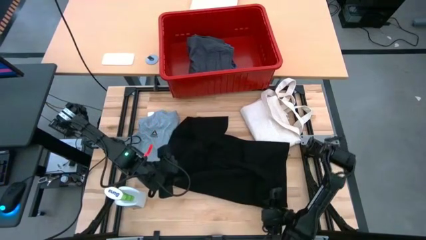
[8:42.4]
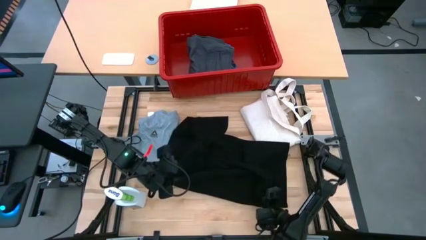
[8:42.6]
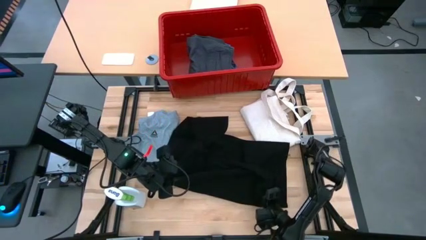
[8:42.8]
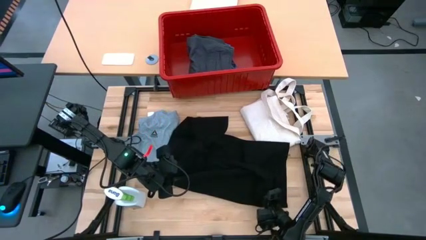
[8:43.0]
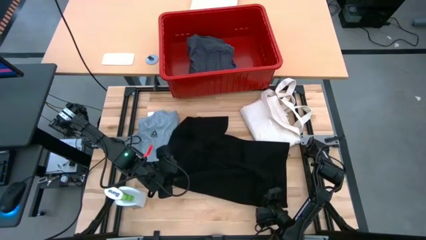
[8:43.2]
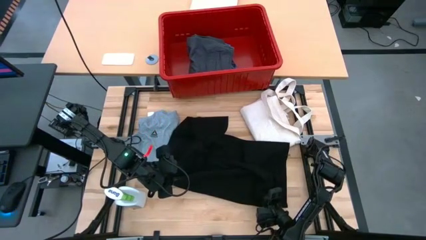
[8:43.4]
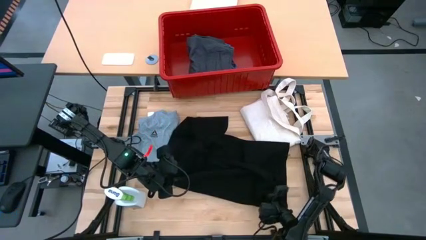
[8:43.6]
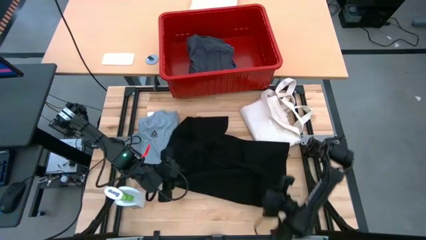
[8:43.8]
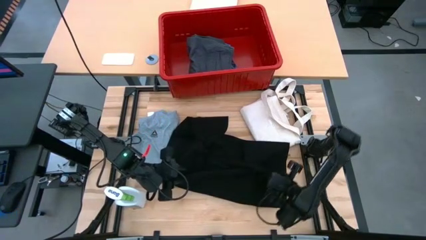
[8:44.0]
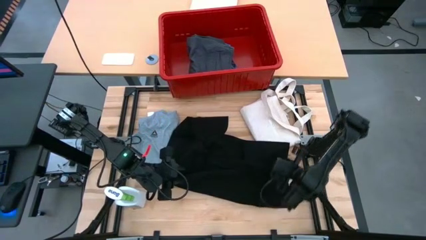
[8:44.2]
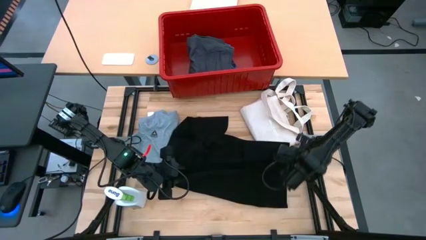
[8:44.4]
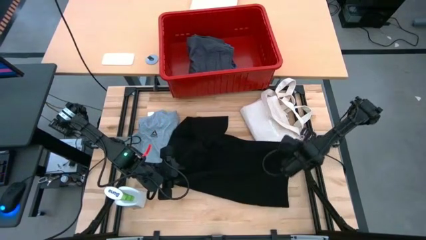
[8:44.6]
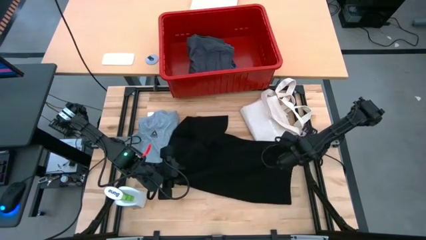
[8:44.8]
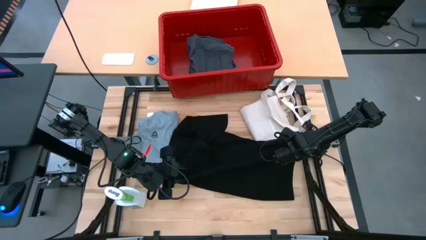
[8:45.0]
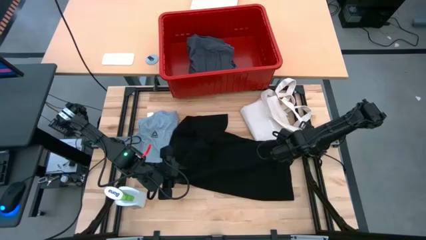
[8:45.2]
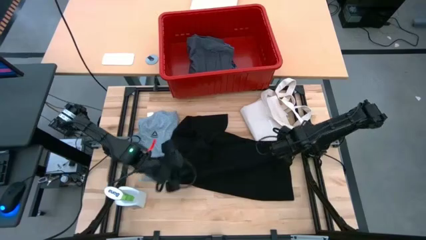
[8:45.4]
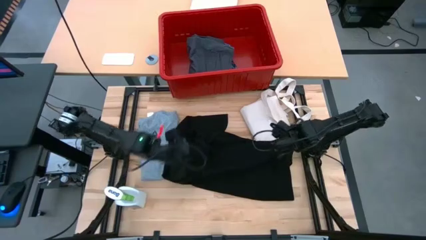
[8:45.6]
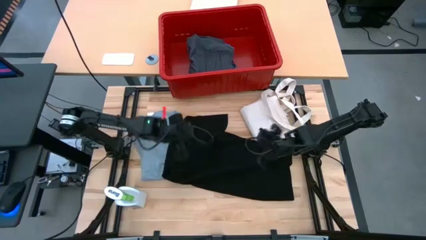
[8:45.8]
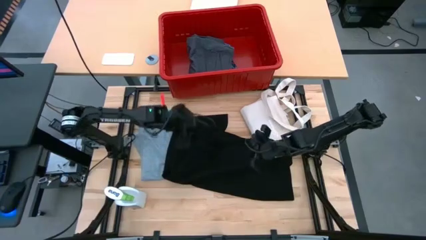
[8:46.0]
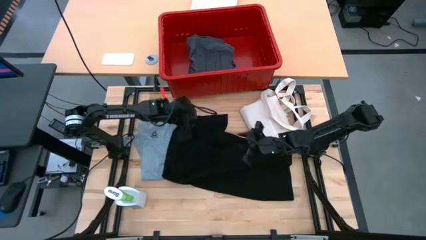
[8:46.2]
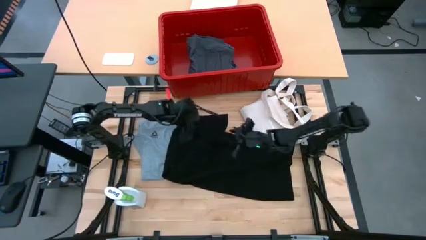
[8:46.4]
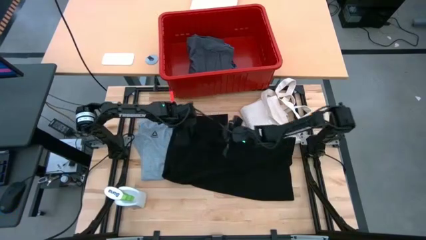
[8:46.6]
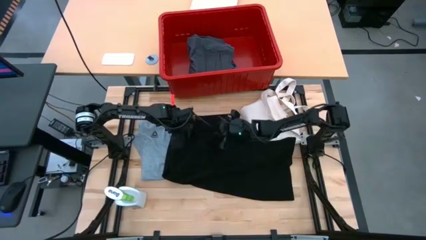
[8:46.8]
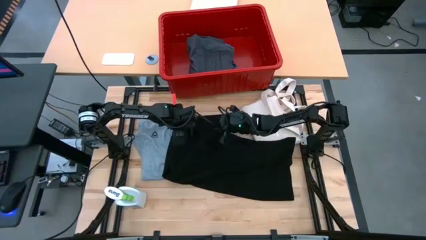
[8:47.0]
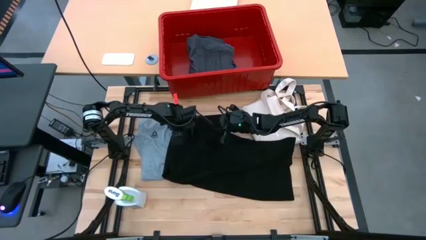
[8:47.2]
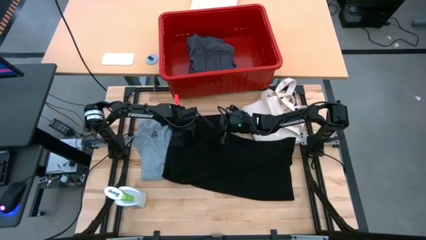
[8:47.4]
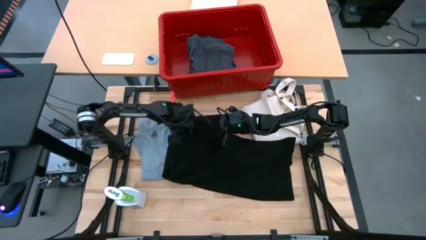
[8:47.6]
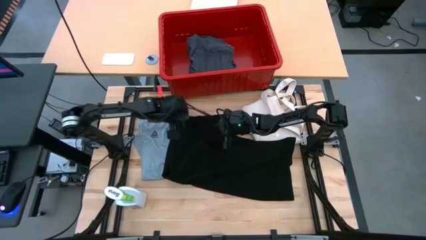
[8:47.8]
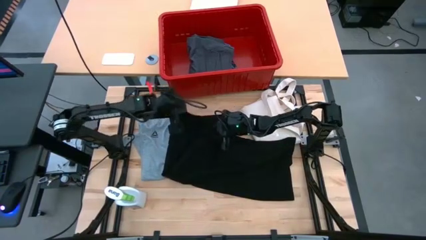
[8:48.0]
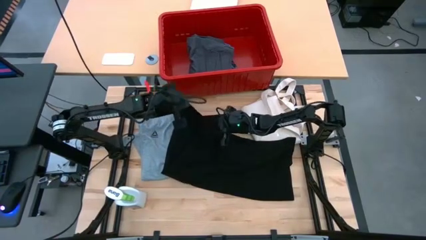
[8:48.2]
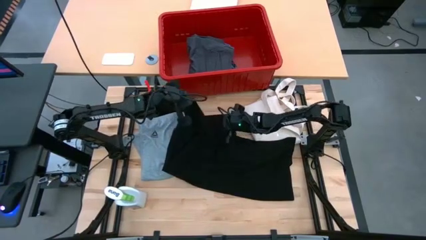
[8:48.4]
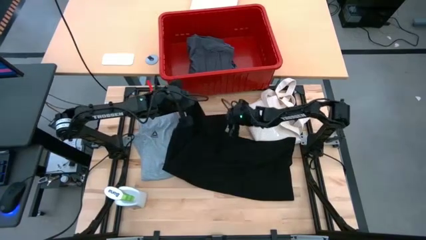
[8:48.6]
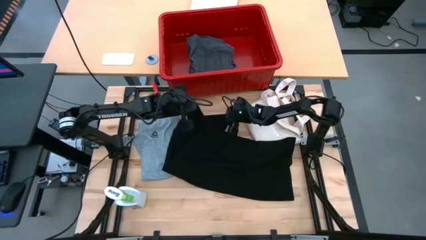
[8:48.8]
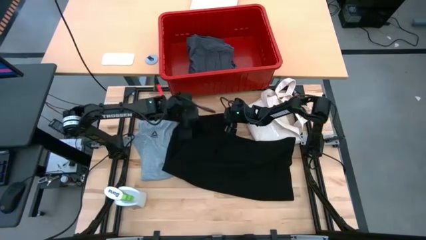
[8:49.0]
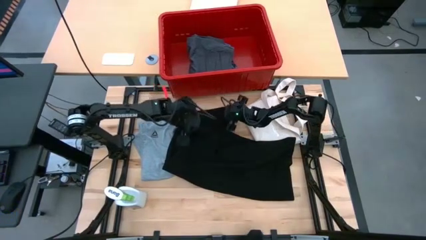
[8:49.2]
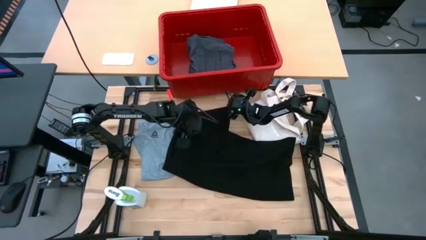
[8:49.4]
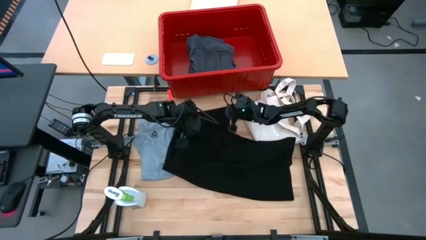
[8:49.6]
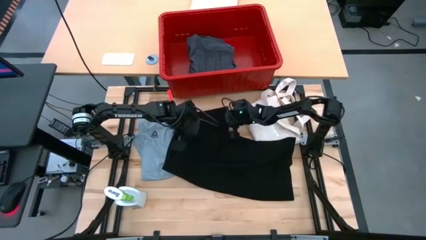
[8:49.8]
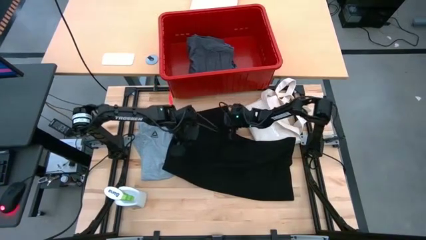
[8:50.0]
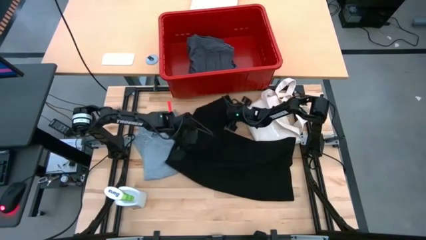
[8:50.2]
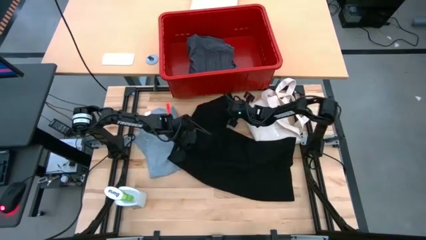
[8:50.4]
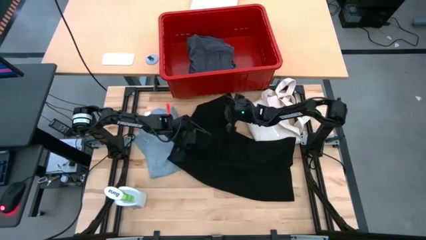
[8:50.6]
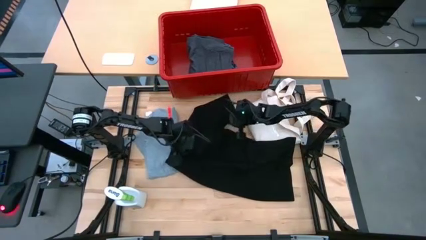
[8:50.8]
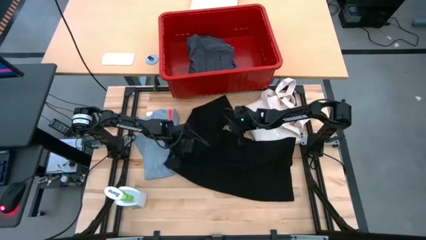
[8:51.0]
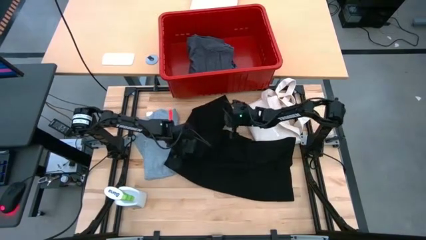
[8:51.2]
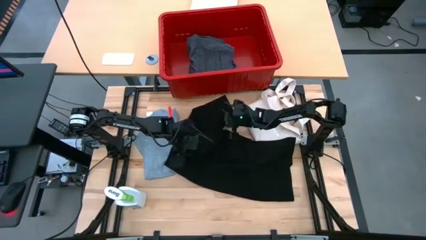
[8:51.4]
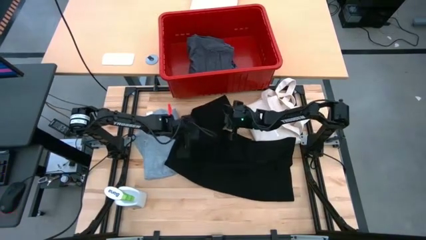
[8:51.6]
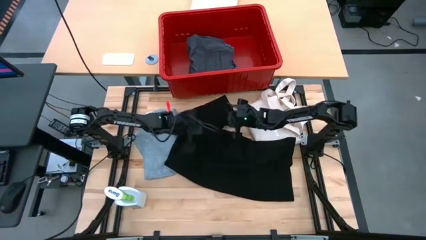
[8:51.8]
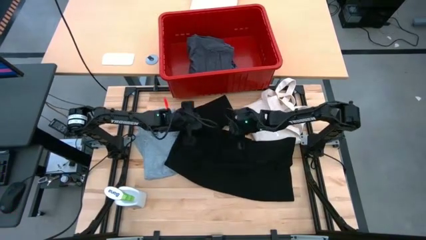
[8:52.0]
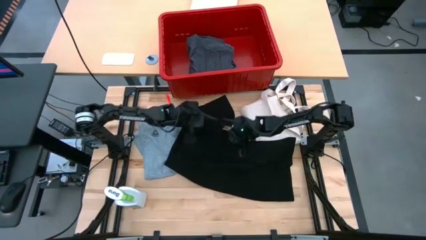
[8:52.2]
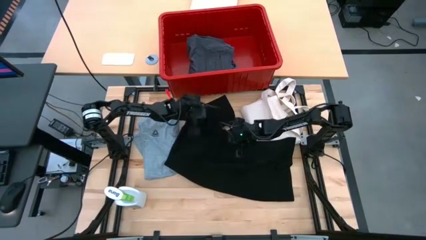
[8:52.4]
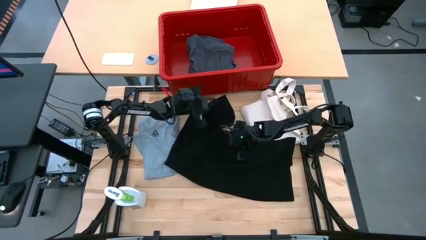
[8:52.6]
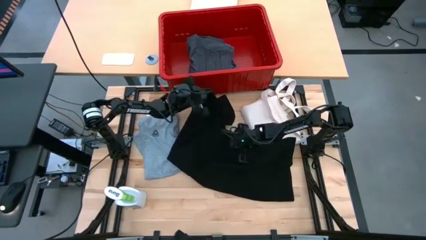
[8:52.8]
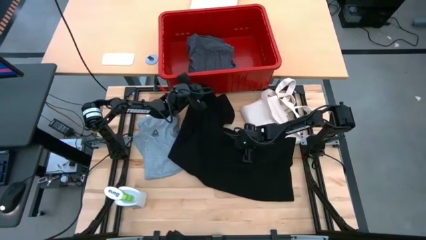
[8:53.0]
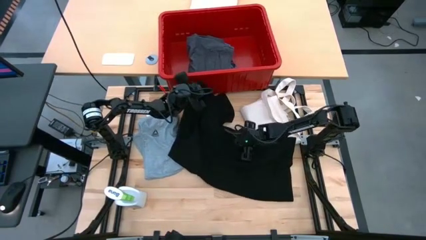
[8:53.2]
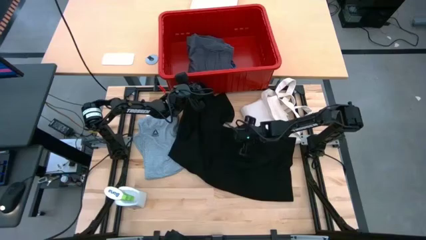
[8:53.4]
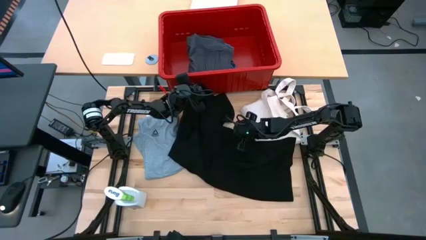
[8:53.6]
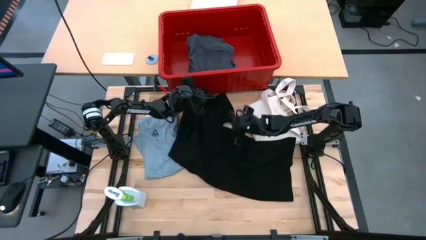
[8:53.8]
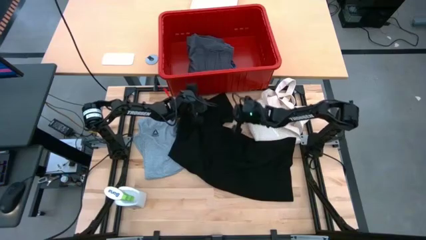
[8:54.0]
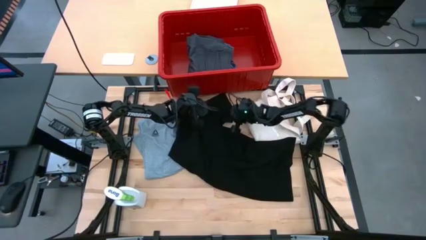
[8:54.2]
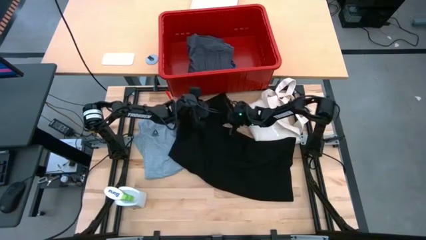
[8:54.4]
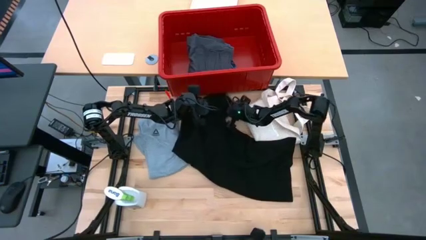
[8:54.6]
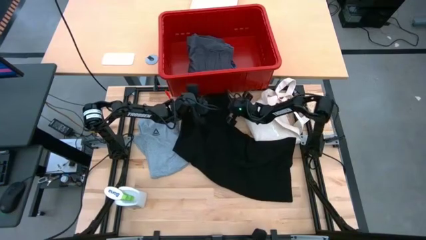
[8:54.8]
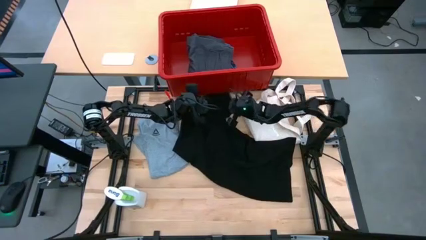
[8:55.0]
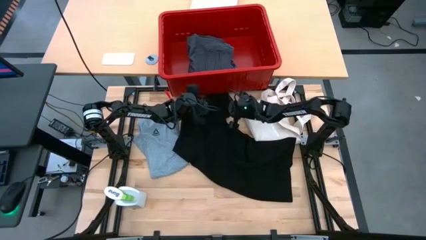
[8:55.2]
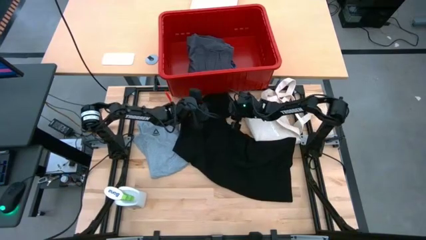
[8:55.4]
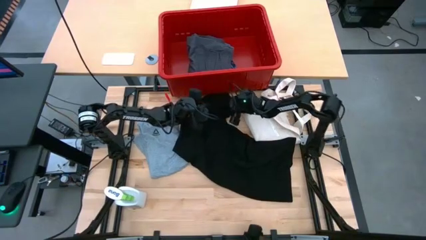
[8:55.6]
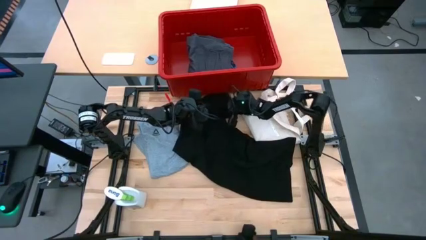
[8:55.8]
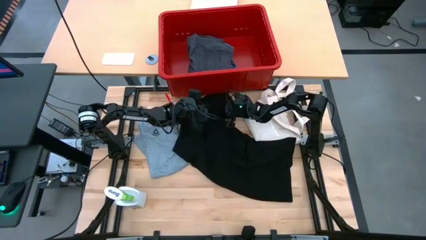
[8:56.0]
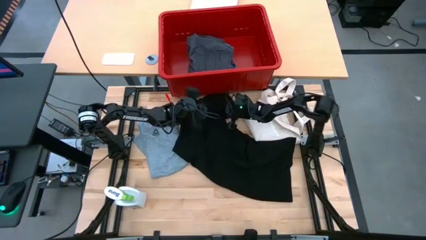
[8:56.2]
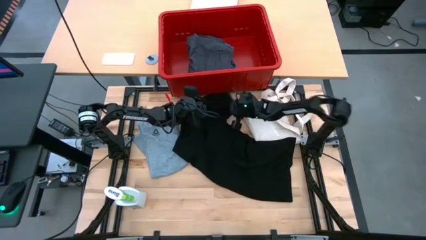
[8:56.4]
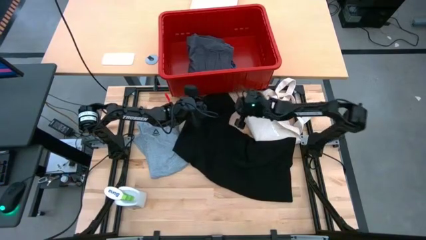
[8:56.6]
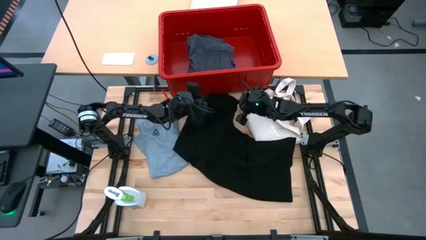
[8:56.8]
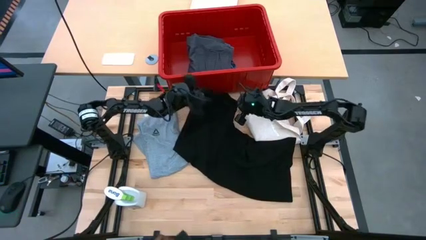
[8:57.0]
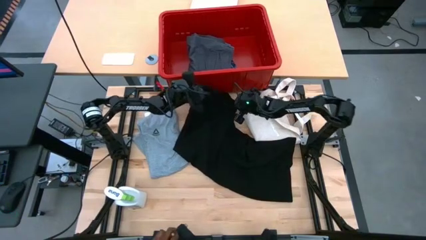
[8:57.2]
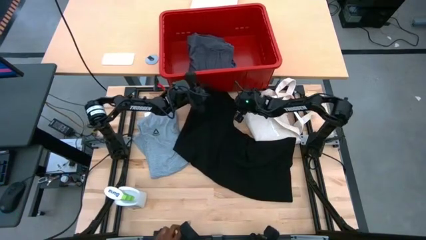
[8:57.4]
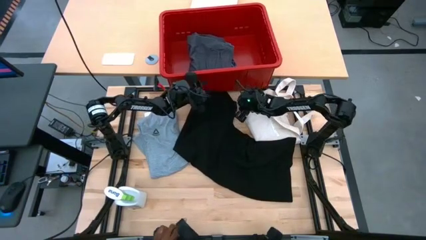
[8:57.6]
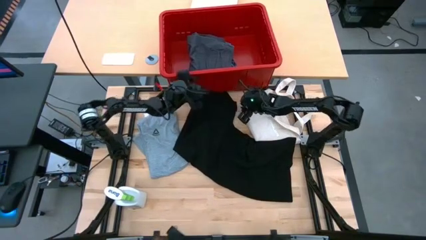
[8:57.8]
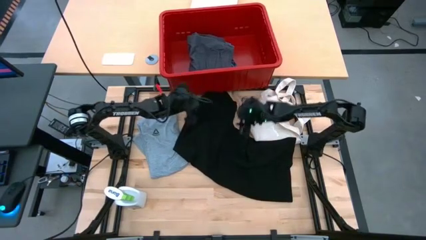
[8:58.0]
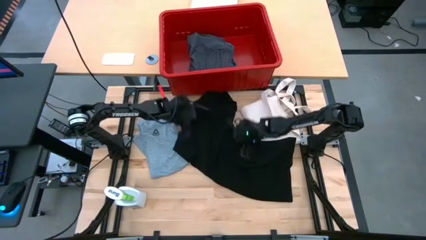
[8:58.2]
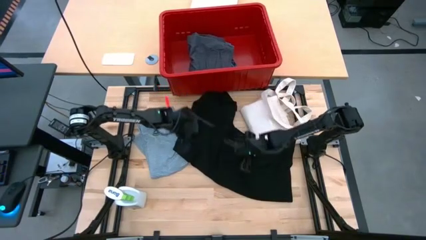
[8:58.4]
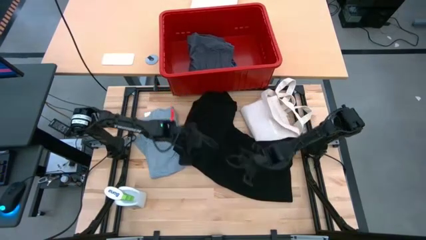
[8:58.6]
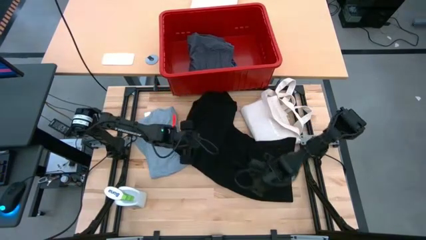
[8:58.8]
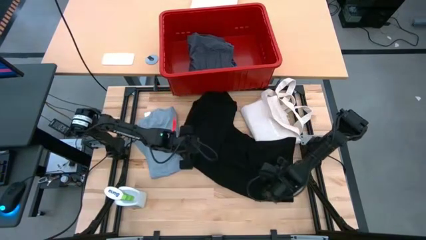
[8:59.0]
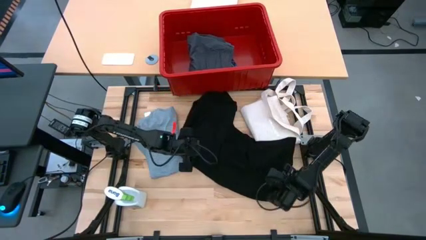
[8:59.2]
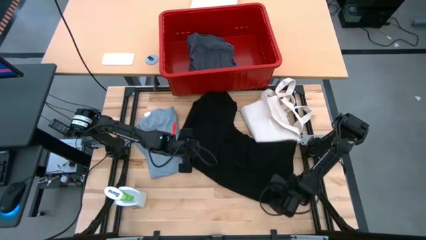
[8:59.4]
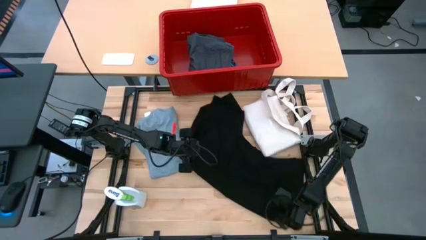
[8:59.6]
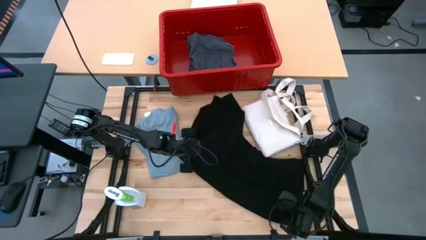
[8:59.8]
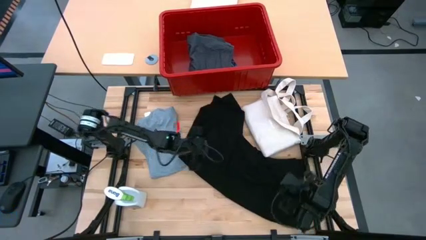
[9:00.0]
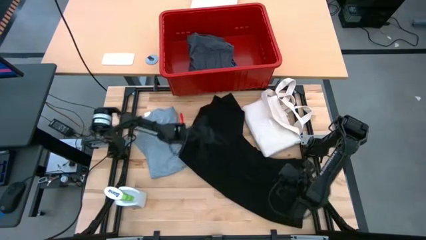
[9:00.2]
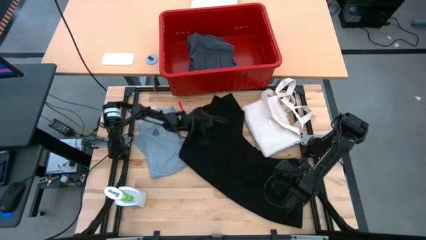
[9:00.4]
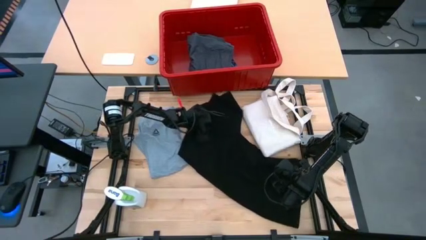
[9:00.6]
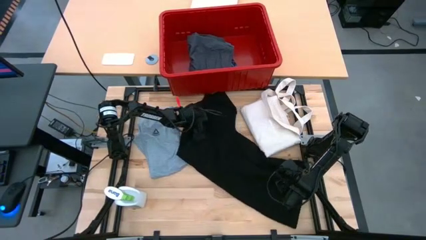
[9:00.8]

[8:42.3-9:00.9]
Task: Fold Laundry from Bin
Fold the black shirt
